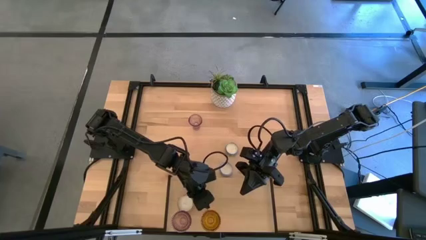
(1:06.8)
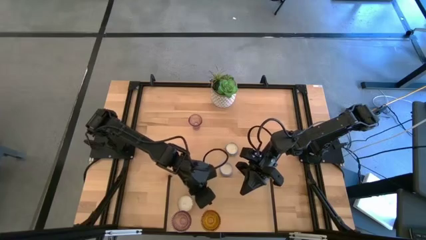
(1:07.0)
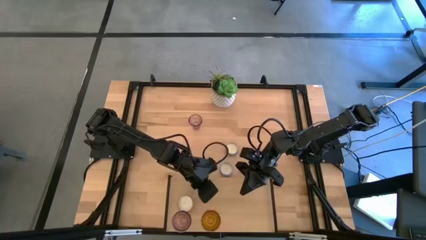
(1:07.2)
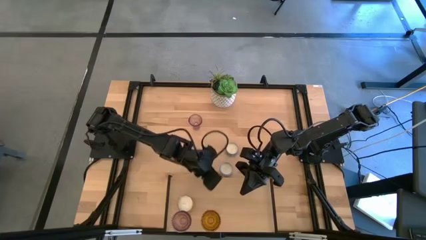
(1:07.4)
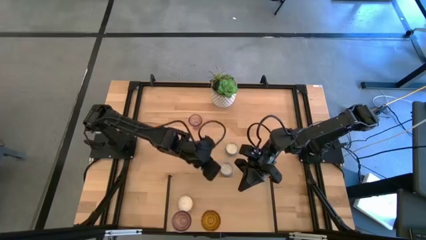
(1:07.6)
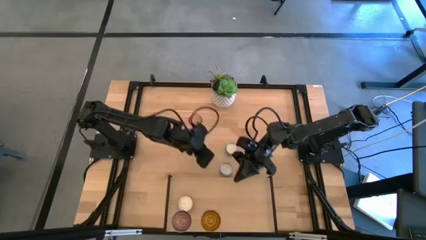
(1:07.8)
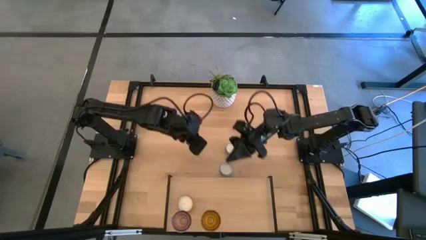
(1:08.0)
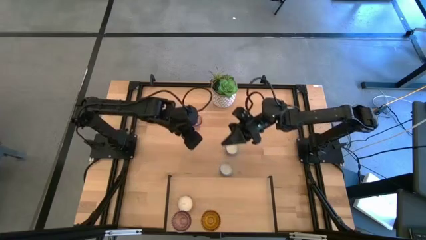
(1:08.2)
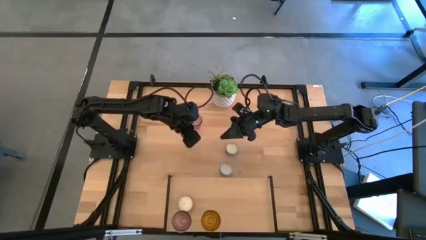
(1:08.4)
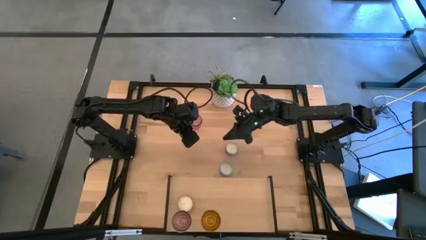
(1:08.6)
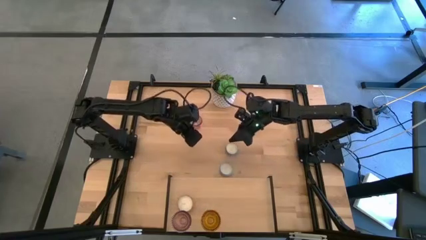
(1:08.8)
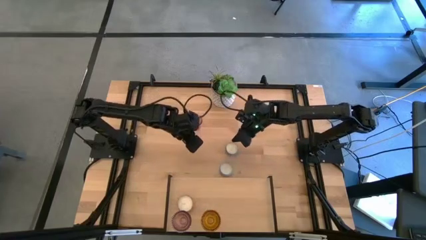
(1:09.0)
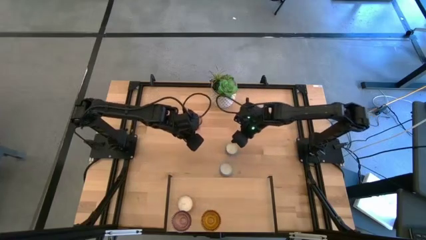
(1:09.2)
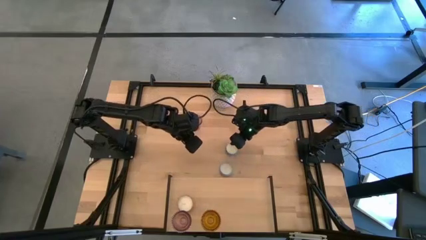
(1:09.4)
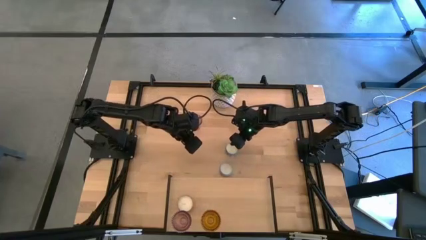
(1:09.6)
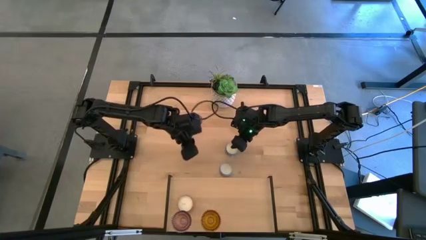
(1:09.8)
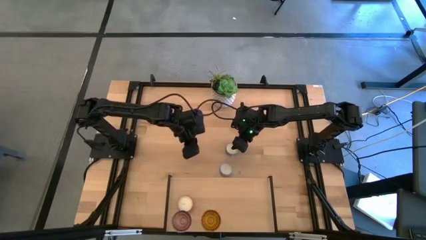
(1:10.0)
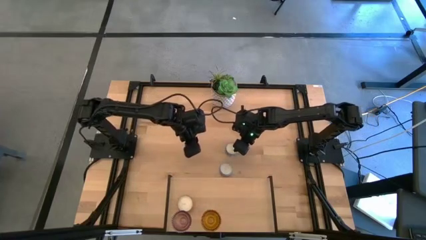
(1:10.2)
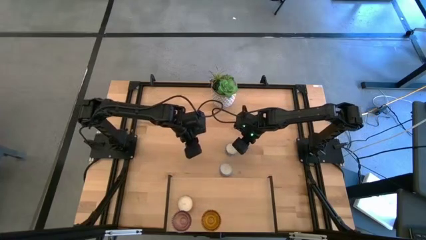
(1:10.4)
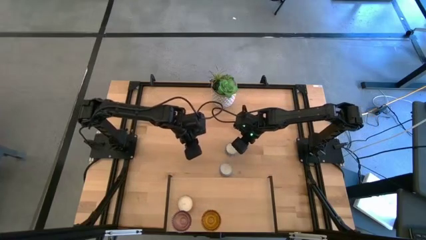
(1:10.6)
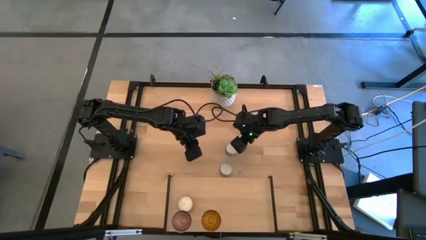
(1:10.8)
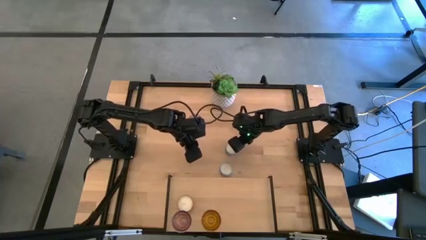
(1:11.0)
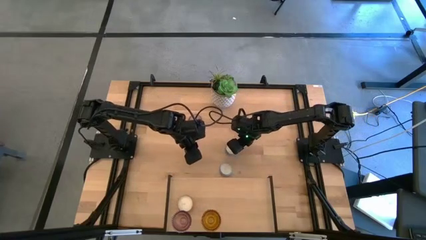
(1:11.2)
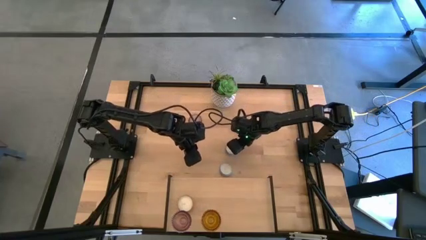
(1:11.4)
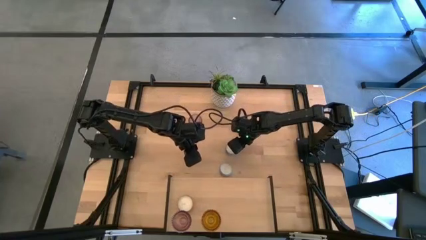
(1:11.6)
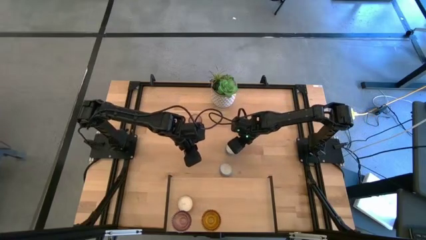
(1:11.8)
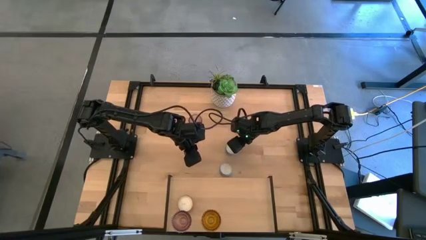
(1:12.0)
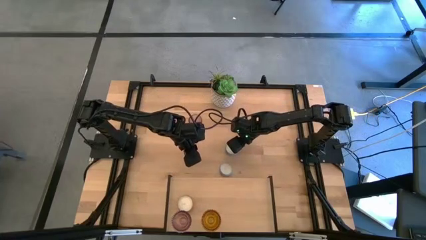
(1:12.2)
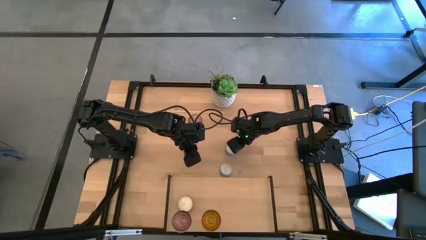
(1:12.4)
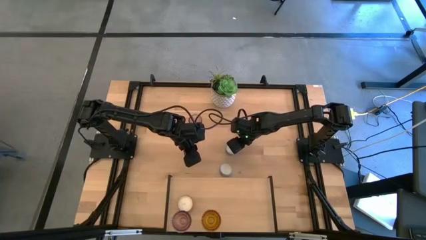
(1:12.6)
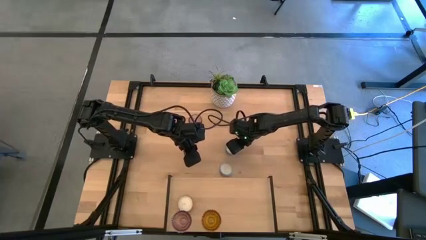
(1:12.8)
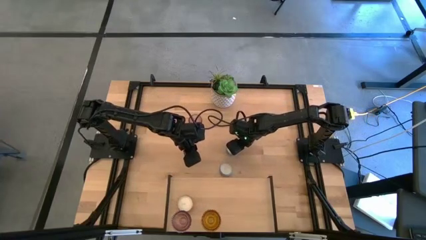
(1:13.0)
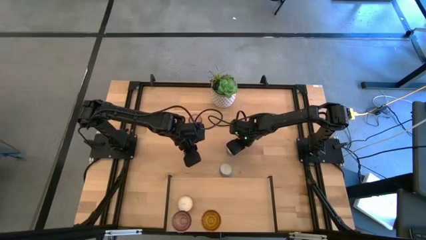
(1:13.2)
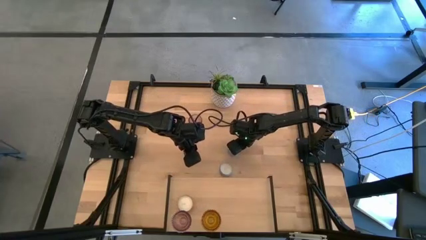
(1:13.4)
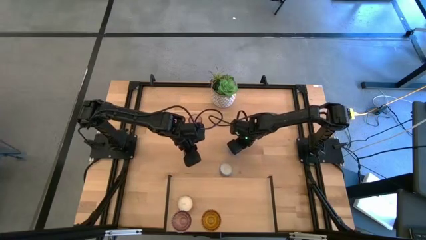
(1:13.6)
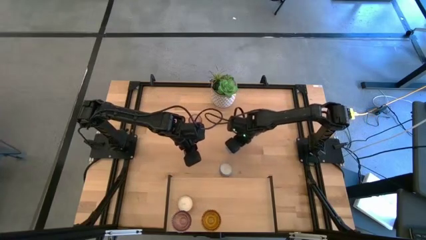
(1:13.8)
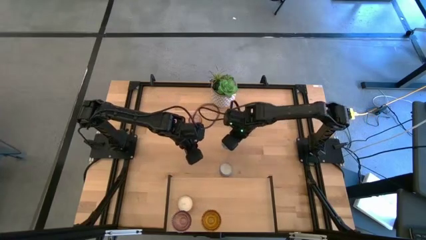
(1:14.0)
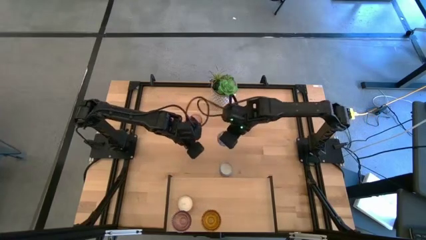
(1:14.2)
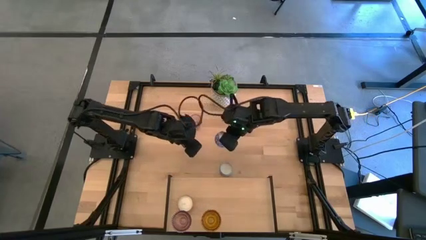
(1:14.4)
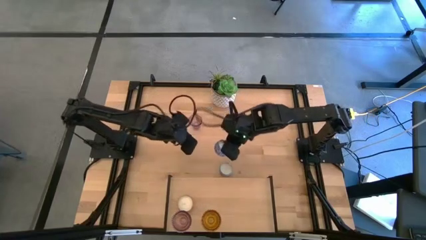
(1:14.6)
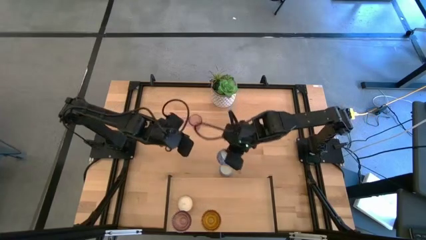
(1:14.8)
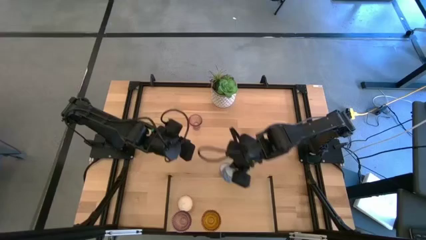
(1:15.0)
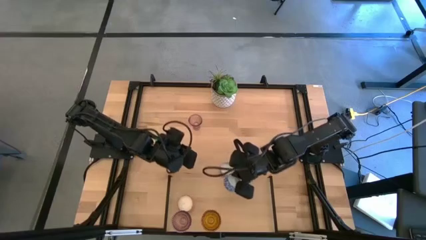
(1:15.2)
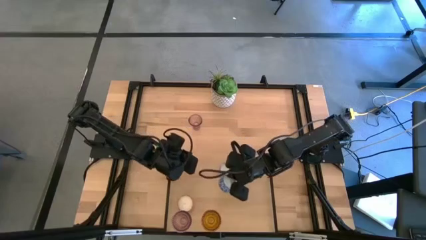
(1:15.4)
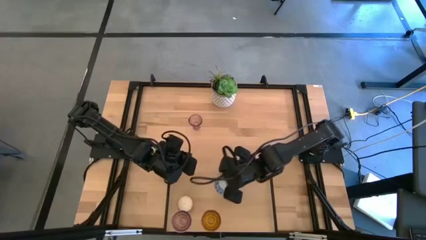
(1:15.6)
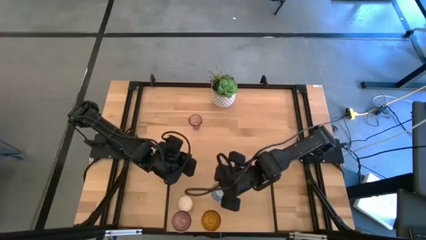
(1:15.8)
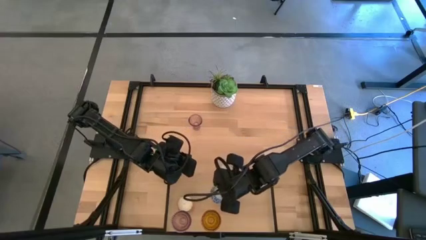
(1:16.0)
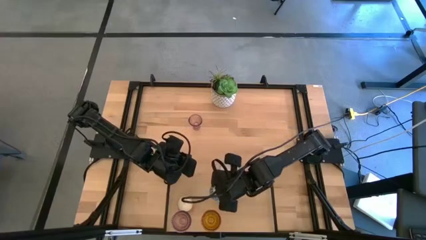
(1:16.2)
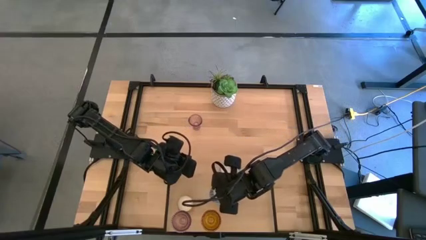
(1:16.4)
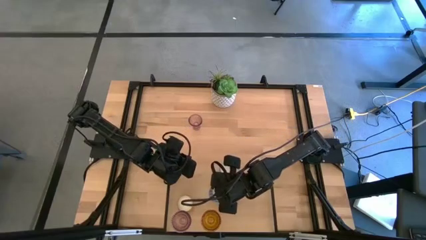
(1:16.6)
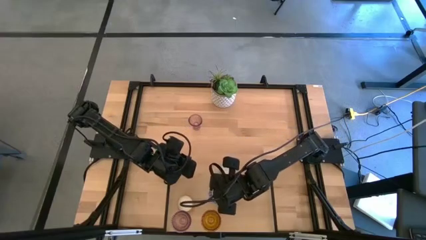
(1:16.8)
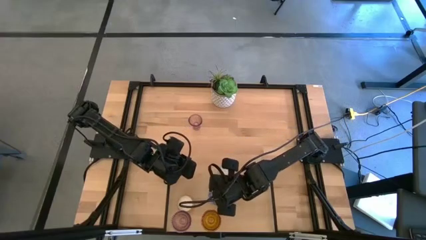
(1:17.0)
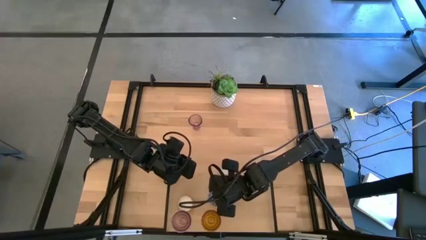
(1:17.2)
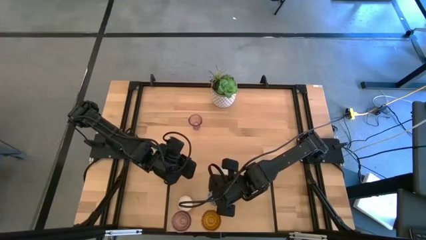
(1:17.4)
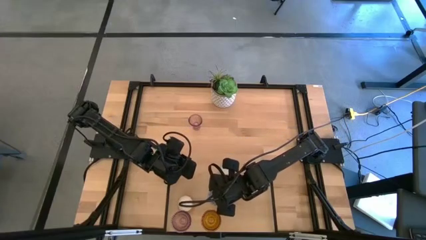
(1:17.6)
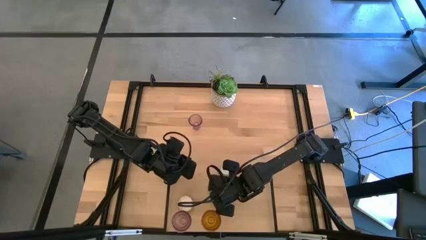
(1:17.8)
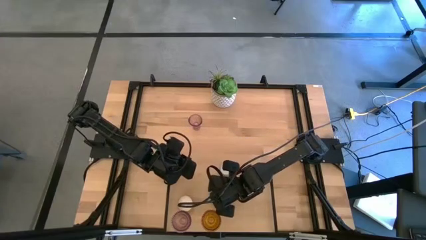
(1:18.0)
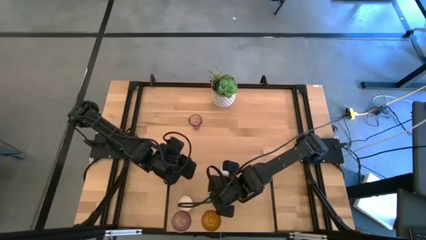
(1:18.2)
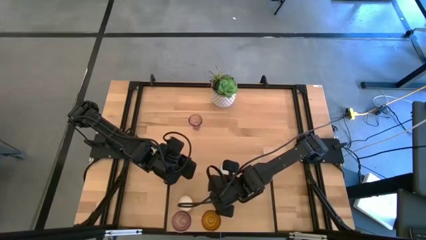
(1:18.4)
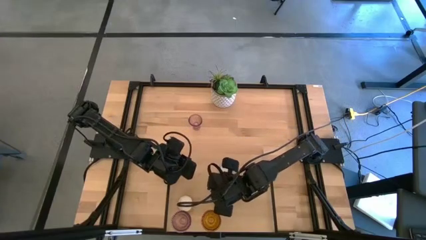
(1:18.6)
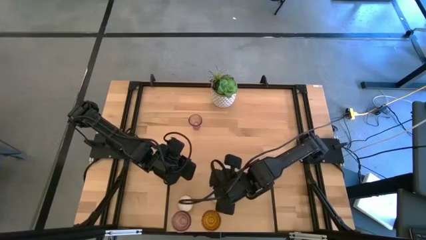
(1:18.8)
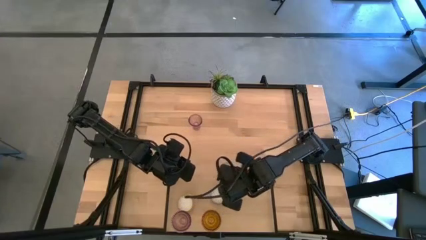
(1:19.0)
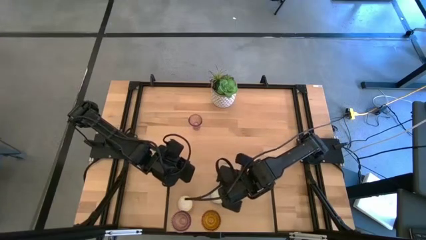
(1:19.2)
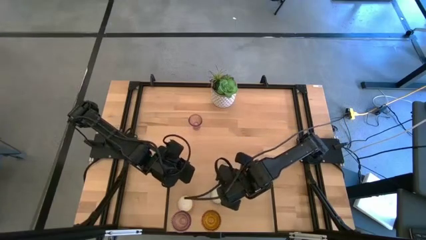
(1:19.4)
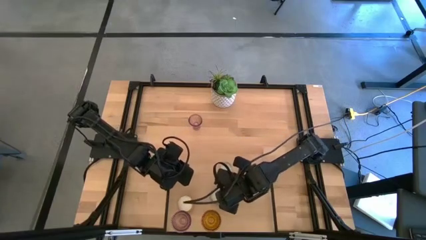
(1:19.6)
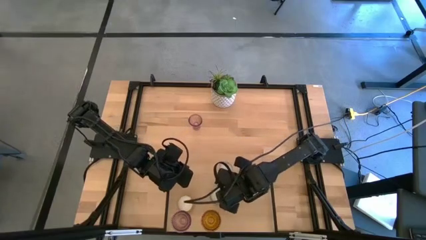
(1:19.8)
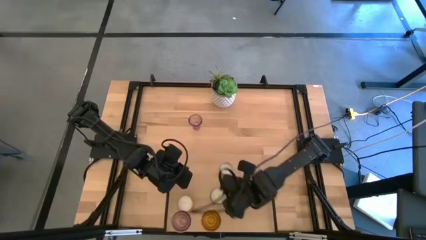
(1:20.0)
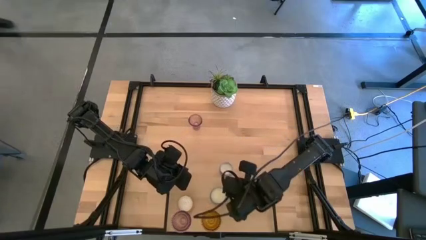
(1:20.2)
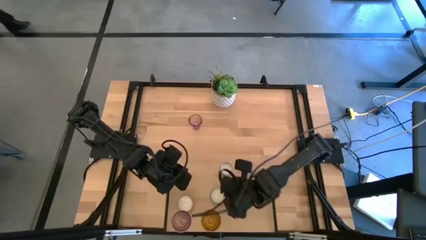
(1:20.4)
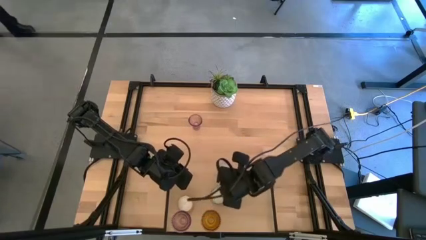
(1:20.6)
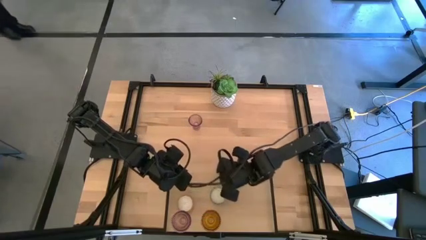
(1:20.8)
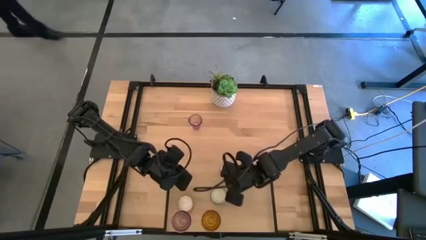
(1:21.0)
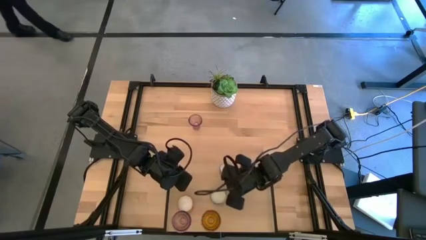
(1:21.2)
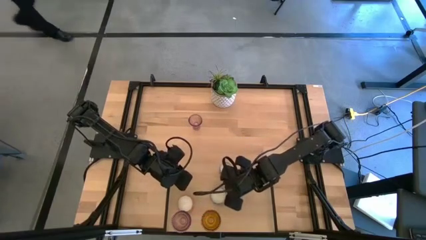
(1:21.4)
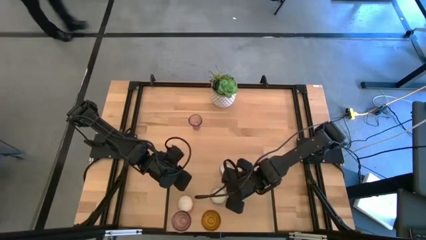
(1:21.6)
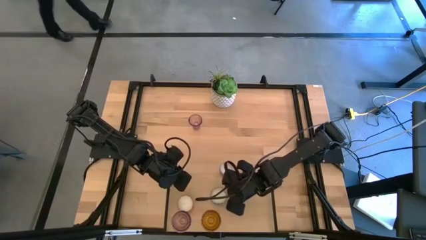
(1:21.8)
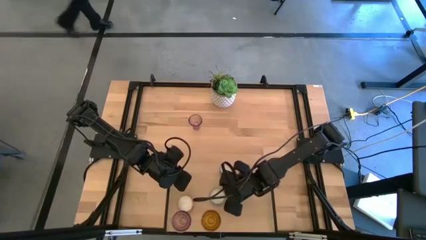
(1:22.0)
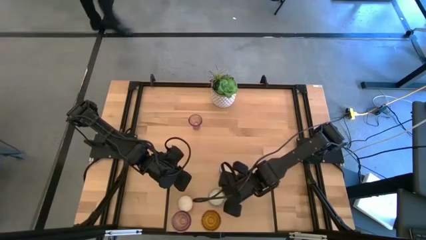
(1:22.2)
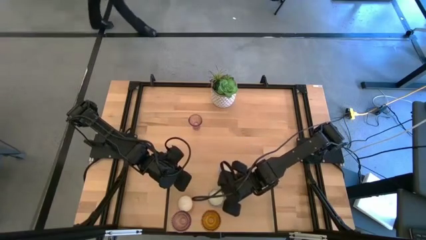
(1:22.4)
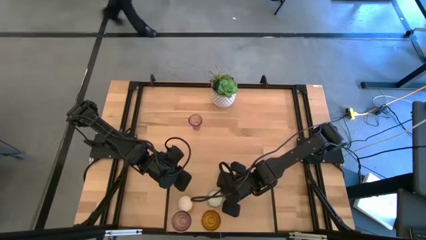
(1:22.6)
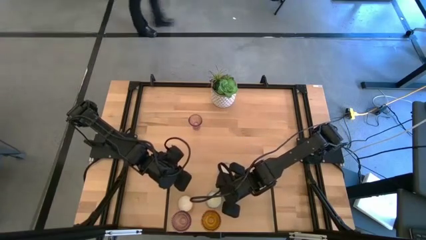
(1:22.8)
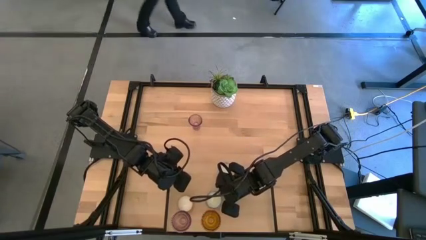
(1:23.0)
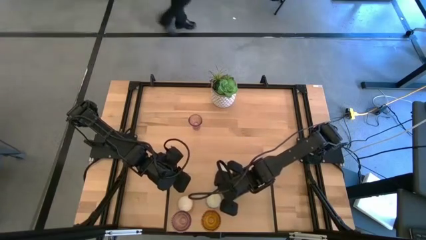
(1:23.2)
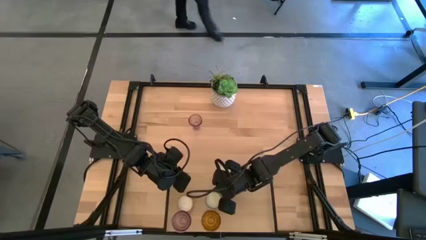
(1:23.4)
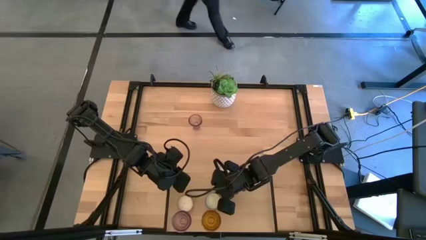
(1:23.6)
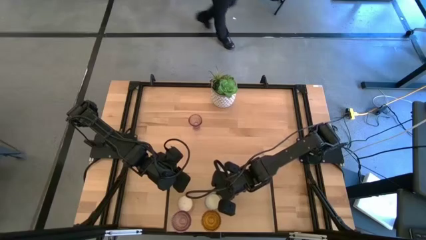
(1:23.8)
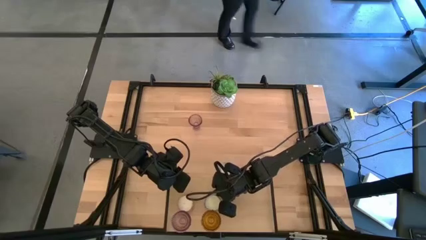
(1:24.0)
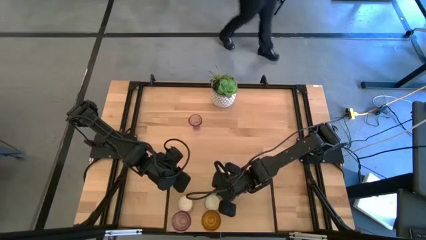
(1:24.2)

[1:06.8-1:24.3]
Task: Pick & Place candle stick holders
Put the blue scented candle on the shelf
